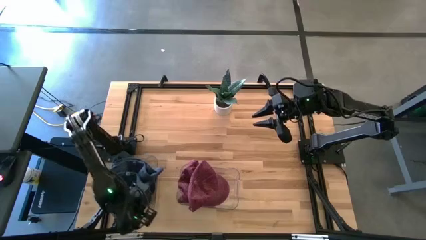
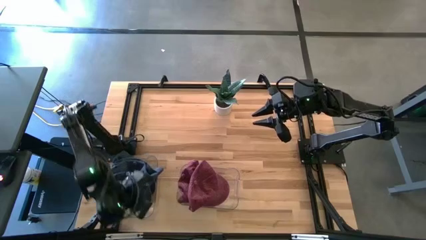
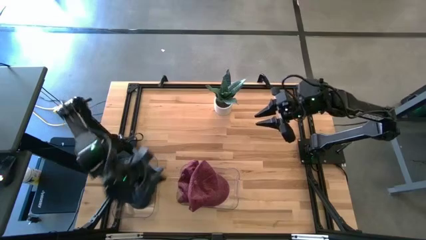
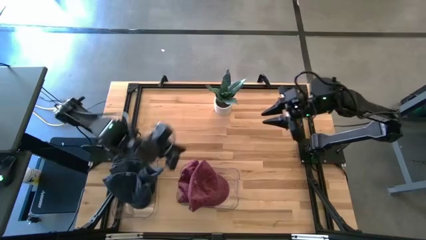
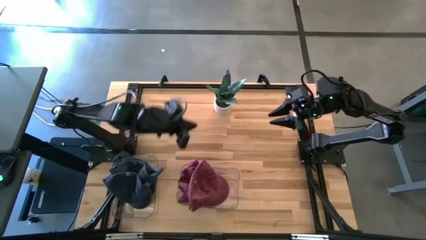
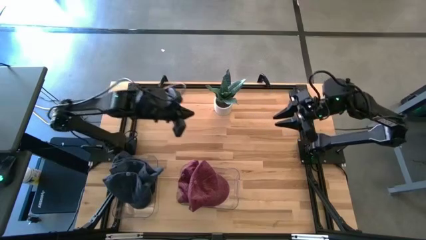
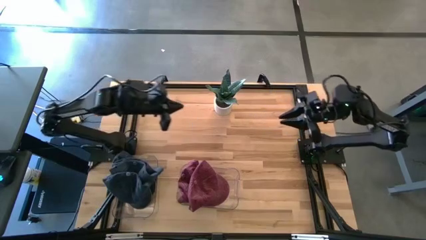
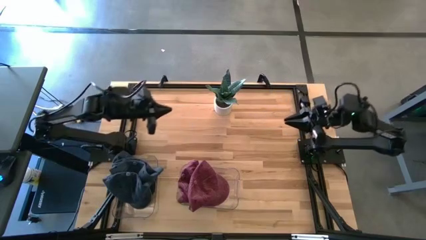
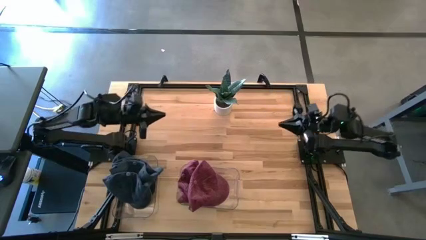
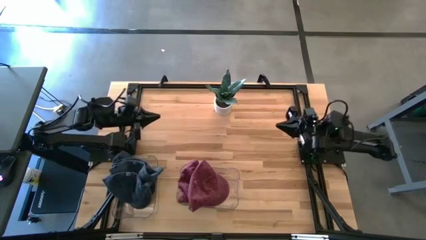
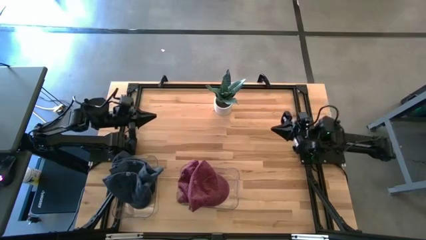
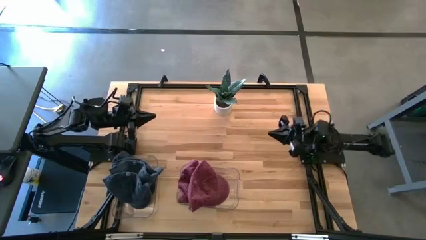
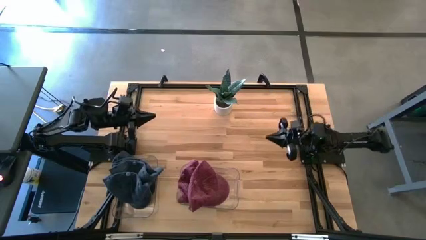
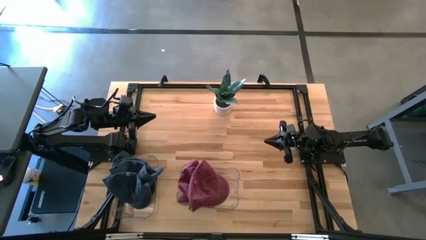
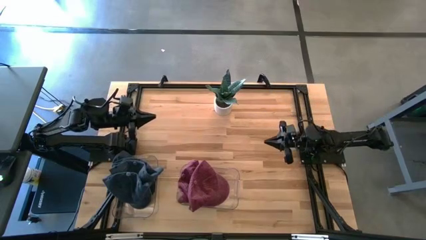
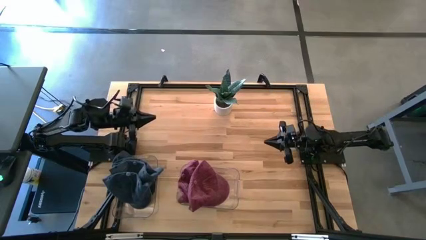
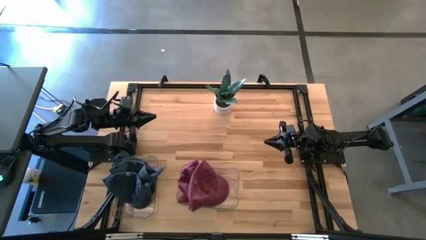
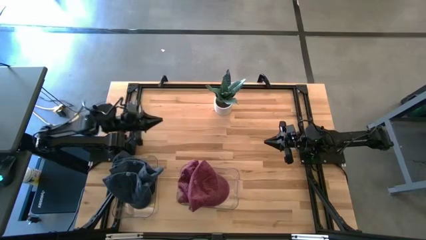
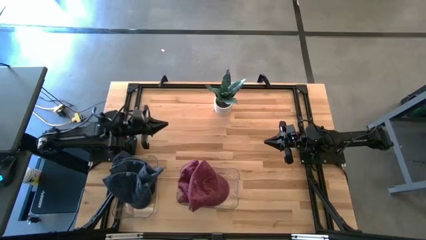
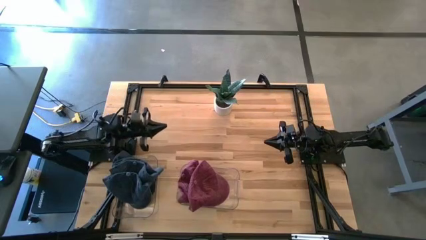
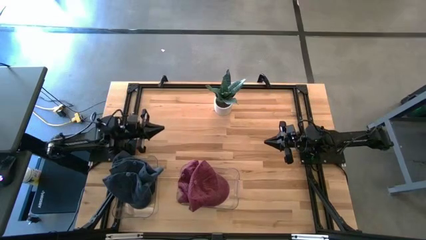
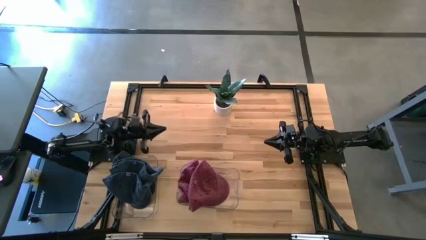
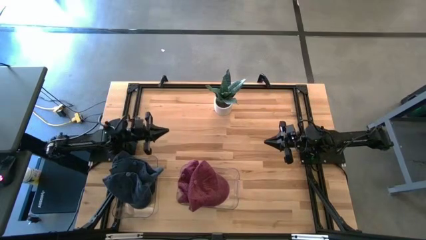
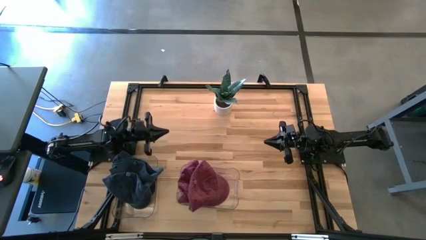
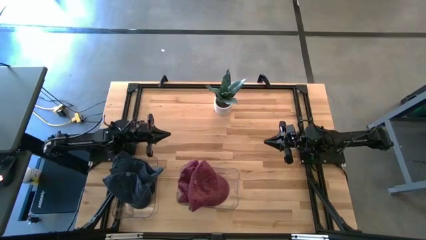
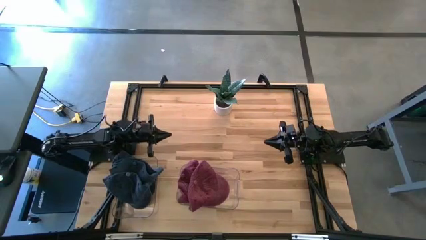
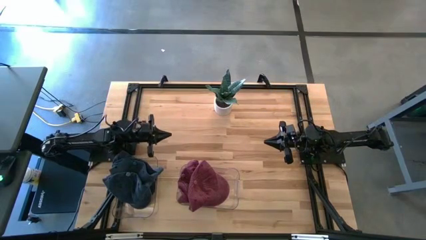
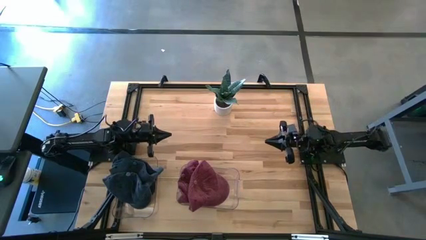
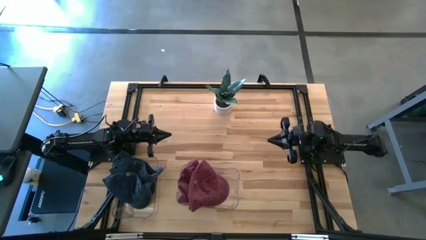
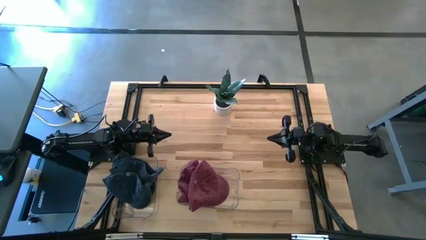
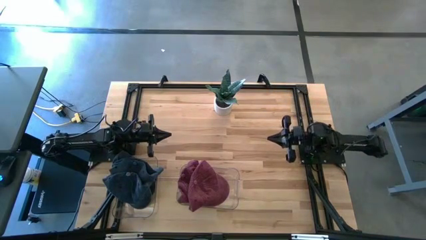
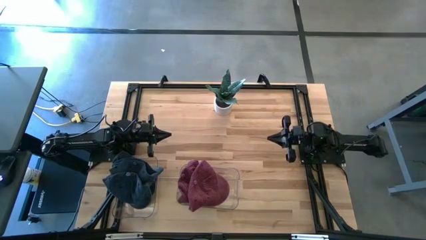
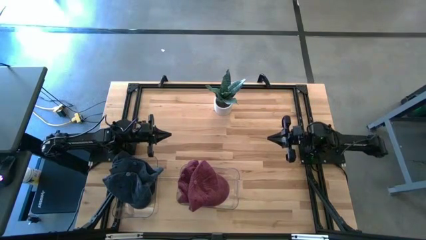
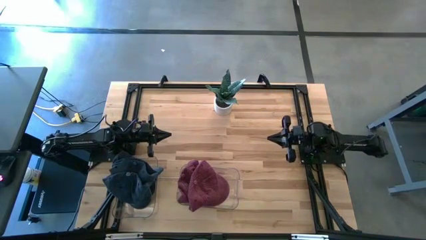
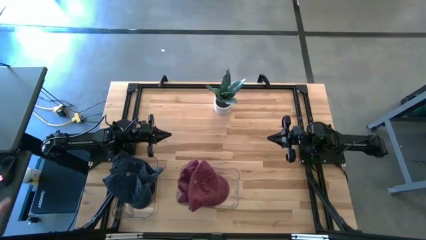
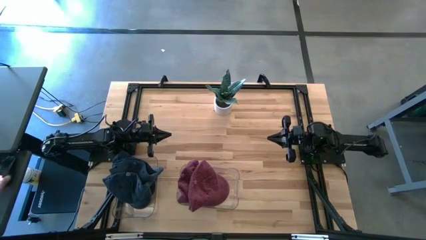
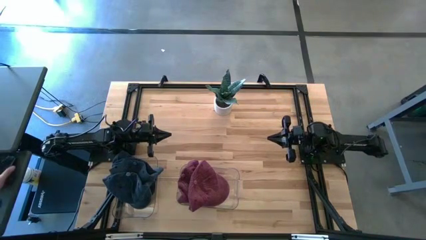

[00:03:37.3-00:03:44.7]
Task: Pick & Place hat
Return to Home Position
